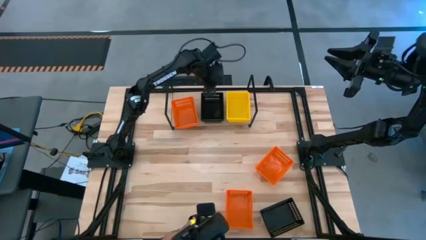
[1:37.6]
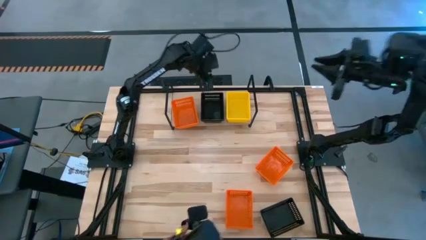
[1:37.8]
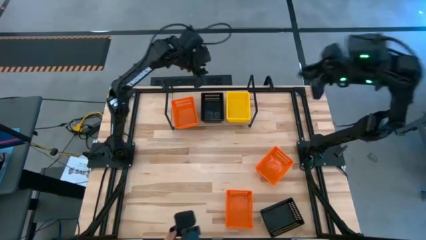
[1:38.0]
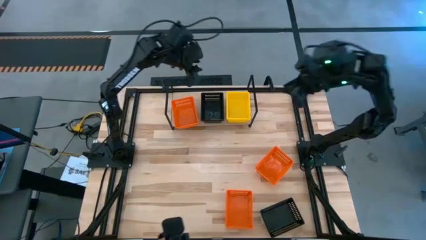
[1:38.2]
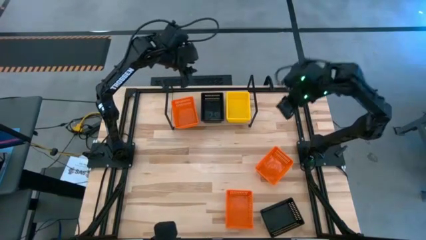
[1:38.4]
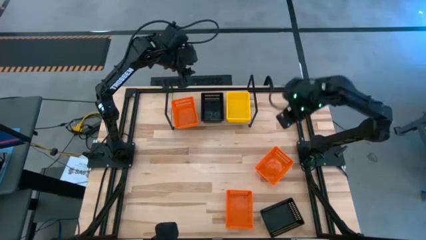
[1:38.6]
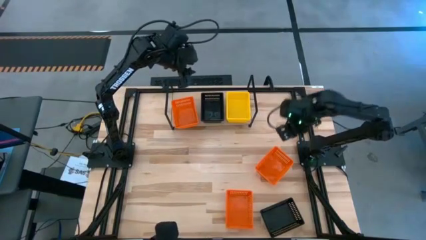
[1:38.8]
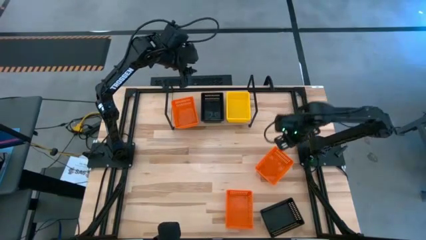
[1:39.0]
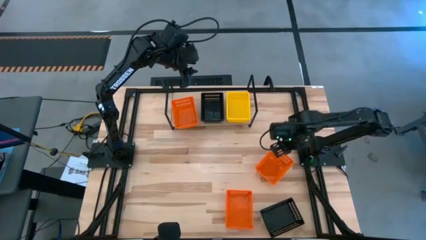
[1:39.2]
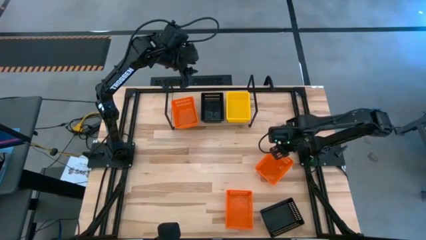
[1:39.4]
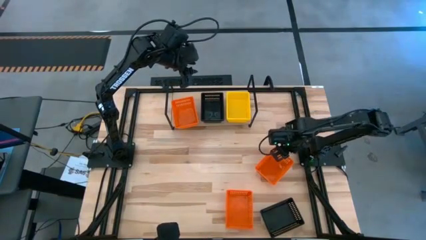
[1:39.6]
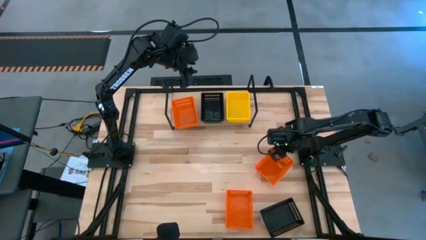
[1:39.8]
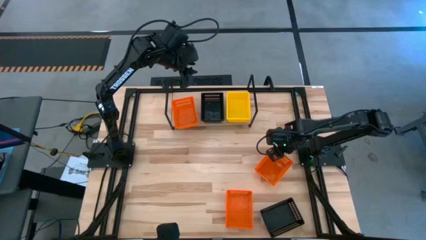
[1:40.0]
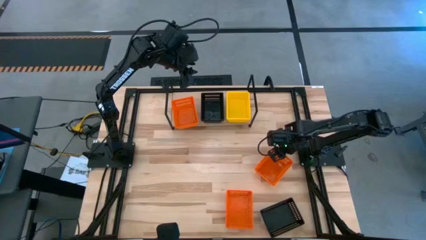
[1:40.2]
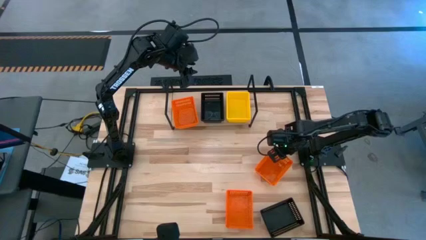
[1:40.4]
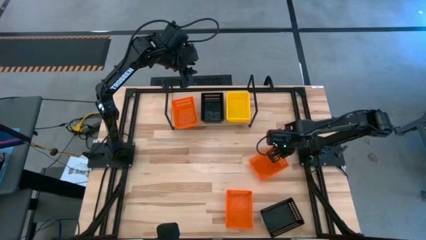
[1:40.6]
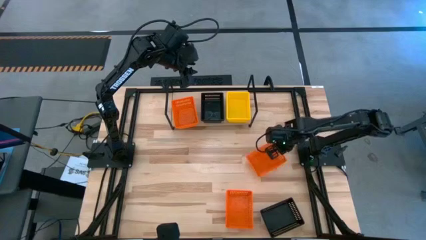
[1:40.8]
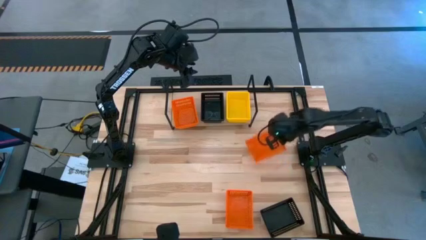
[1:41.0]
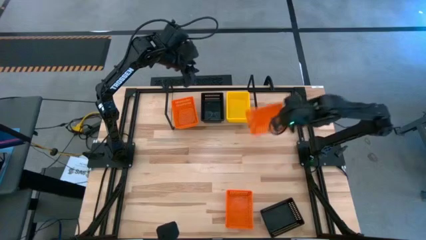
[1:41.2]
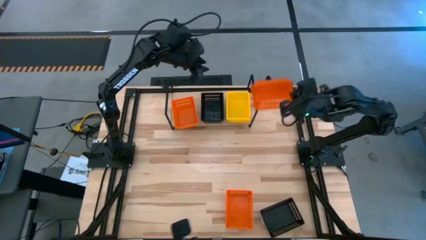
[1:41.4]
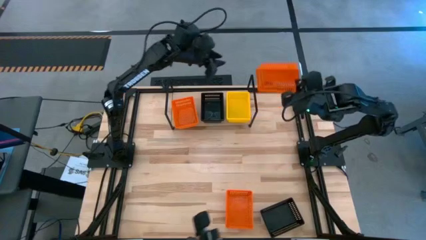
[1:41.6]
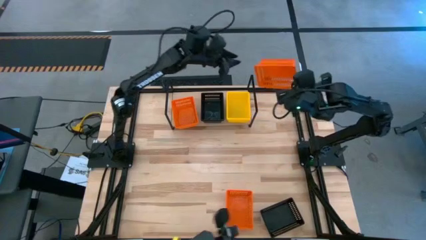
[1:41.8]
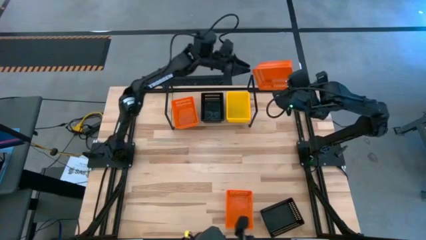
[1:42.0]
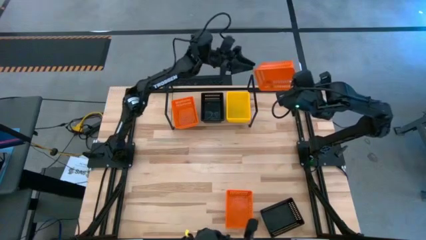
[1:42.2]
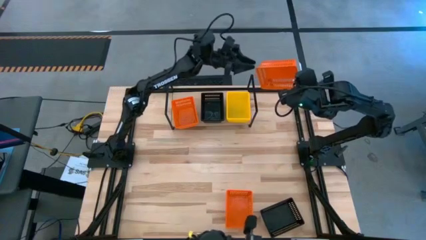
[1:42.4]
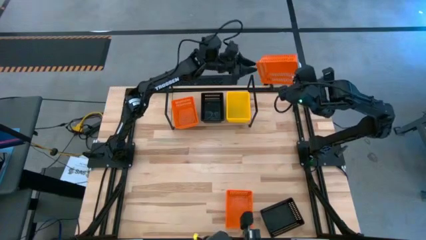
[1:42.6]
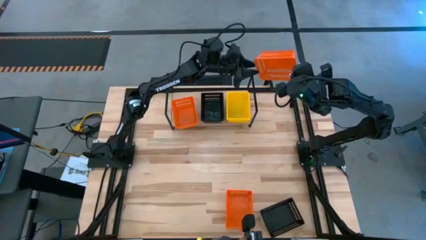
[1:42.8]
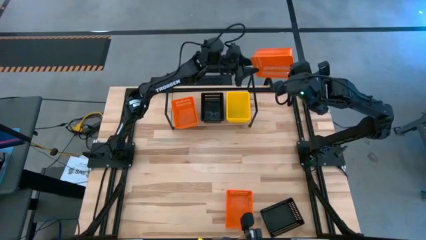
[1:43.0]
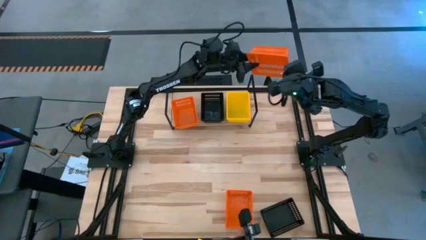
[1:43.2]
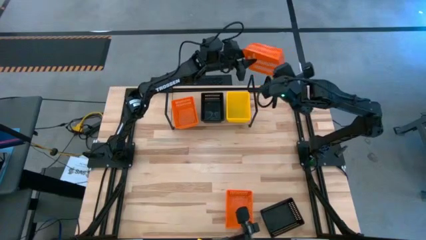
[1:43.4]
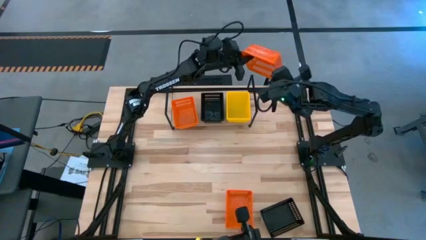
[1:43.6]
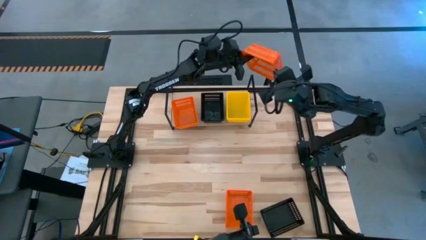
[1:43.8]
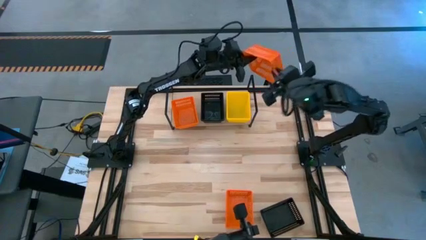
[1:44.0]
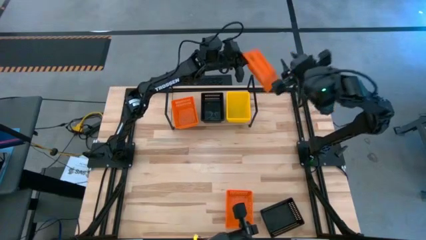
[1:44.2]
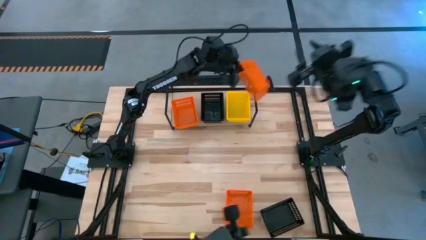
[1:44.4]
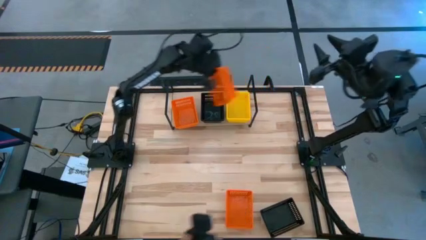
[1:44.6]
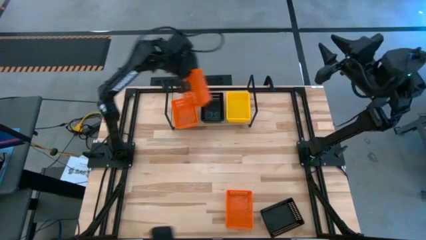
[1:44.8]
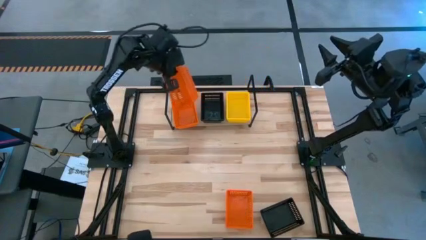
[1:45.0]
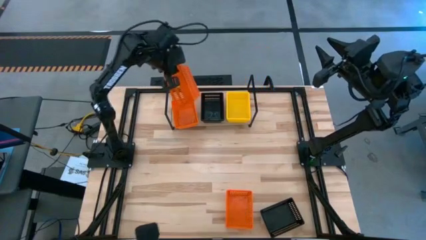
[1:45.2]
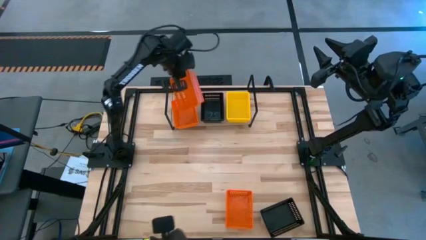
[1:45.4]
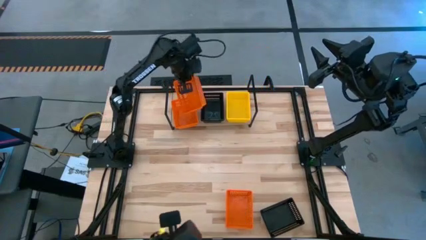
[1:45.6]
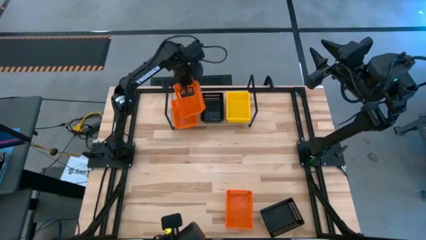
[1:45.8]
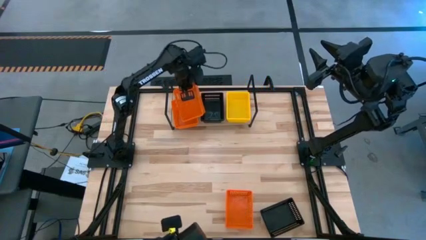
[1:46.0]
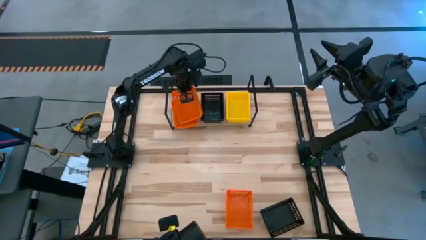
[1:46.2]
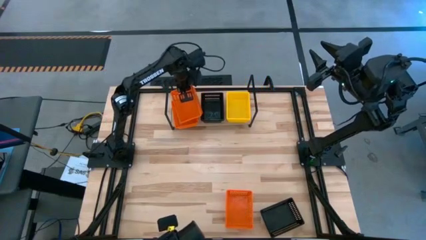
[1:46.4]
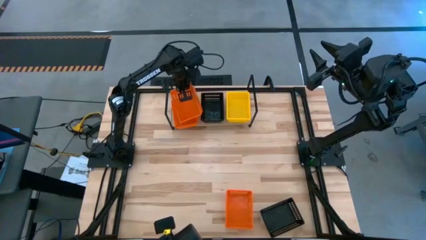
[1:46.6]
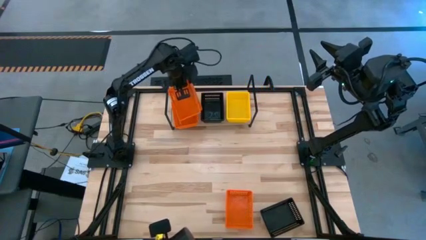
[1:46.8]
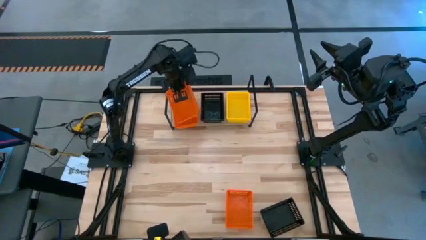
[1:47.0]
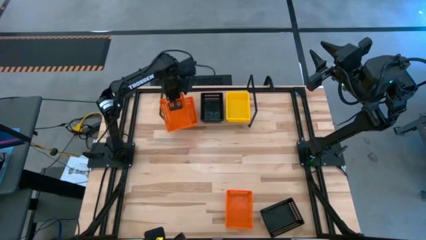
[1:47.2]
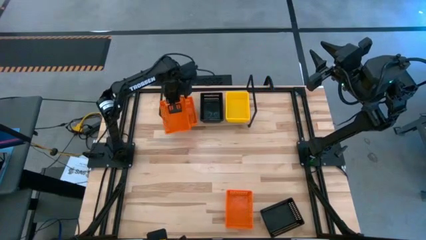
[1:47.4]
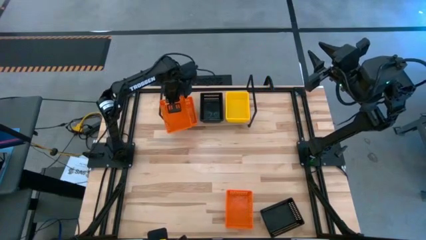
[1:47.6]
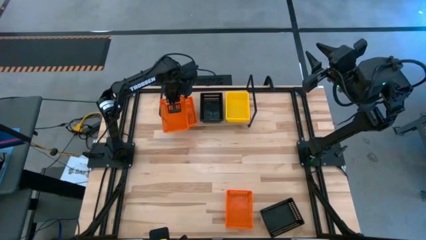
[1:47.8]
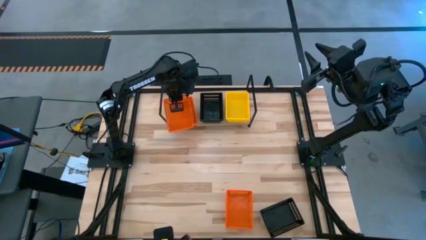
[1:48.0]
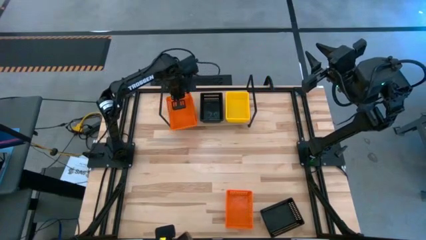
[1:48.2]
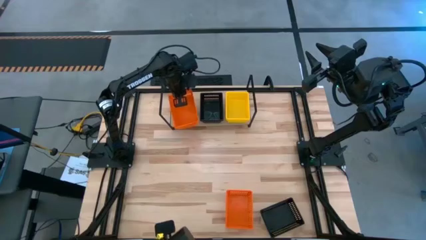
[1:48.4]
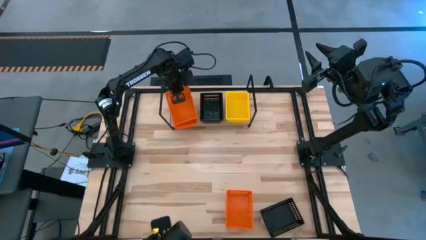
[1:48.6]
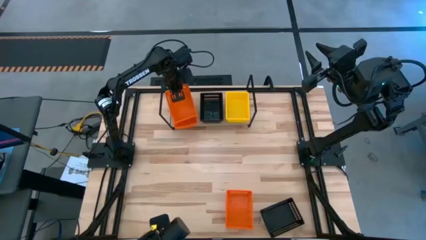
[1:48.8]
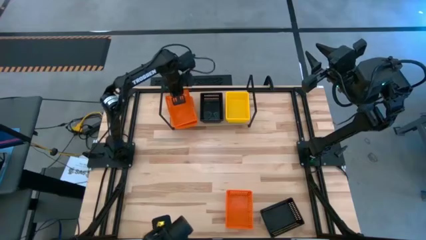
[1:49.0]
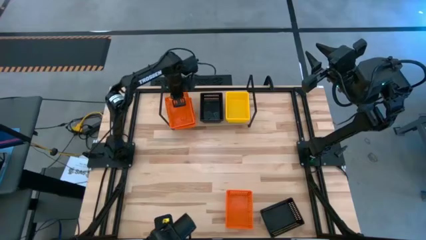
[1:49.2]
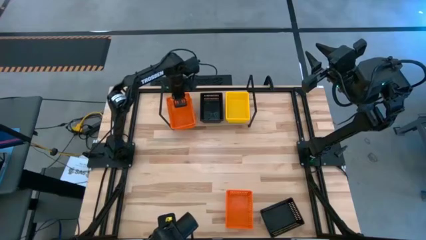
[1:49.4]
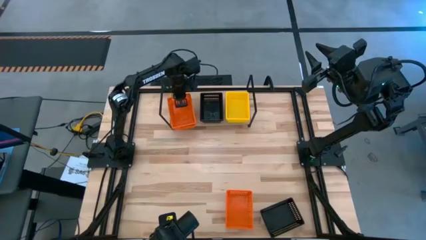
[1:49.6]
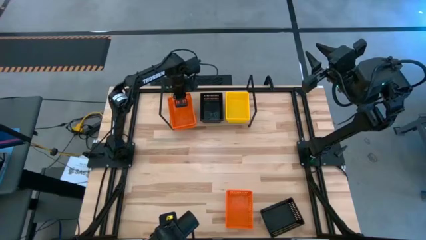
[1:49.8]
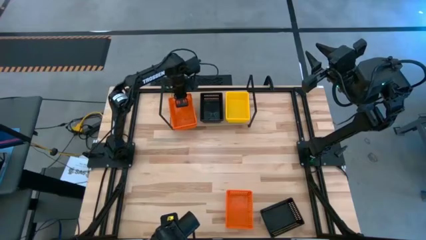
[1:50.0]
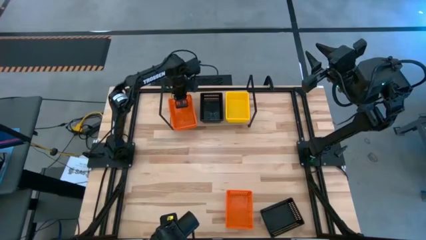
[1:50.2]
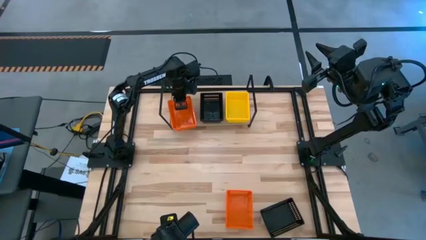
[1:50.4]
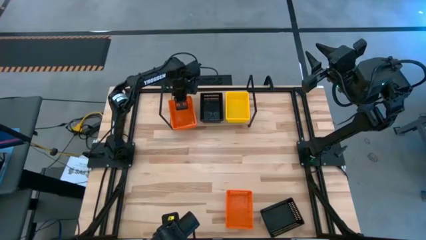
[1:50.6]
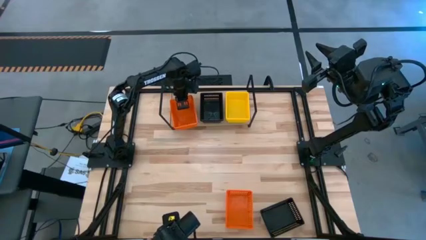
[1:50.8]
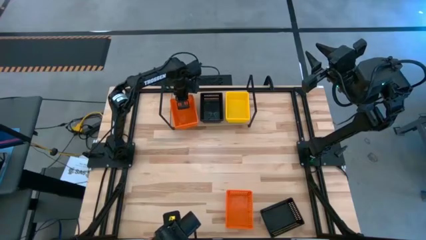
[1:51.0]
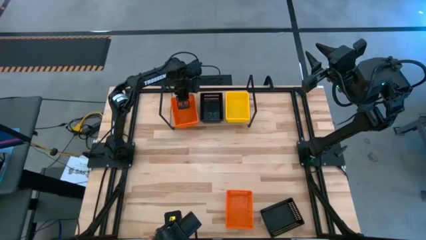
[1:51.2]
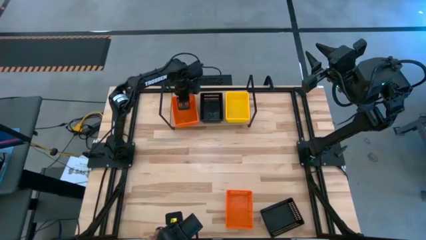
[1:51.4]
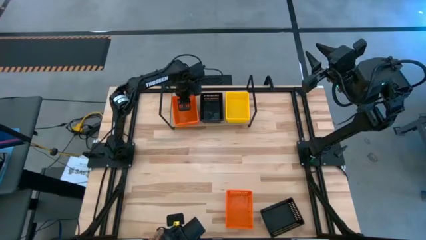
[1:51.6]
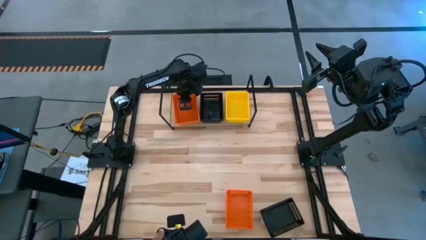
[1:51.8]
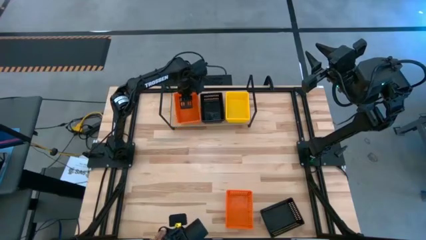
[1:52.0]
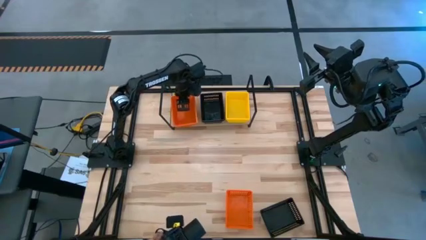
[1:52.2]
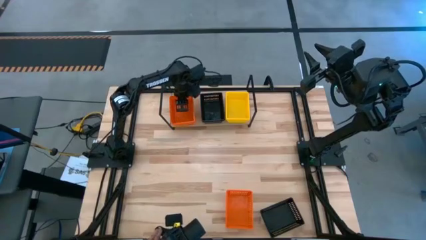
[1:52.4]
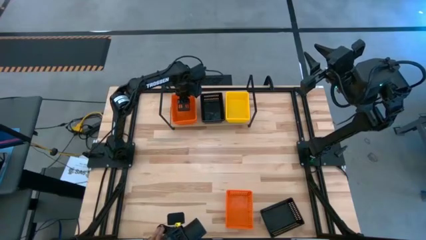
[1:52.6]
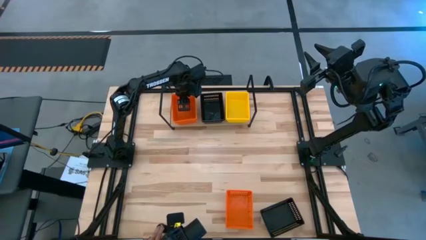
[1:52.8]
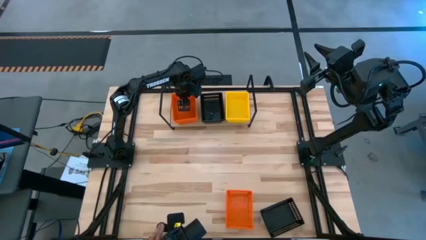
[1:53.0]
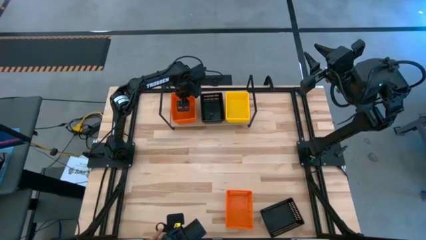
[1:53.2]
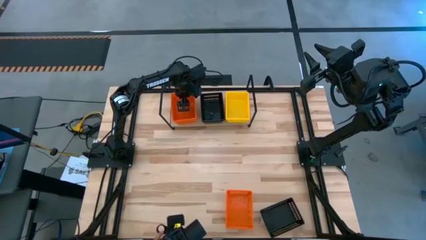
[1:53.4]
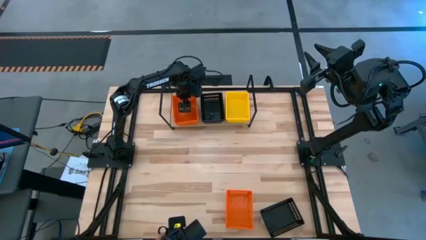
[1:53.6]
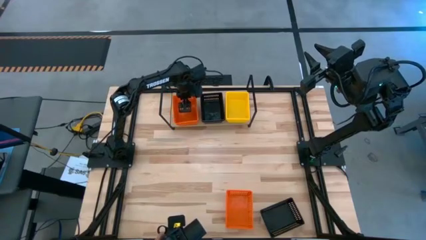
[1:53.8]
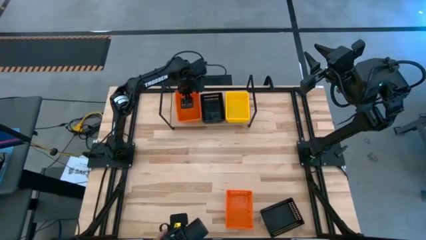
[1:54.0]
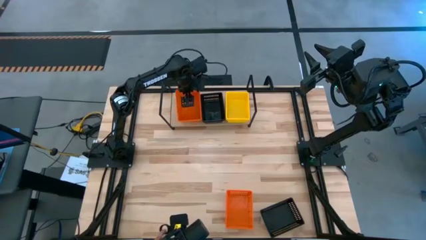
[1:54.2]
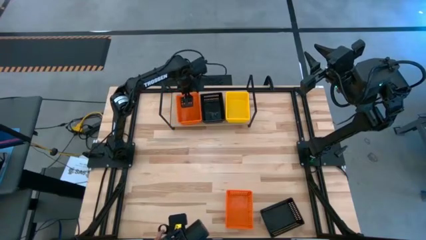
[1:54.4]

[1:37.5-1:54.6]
Task: Stack baskets on shelf by color
Stack the right orange basket on the orange basket on the shelf
